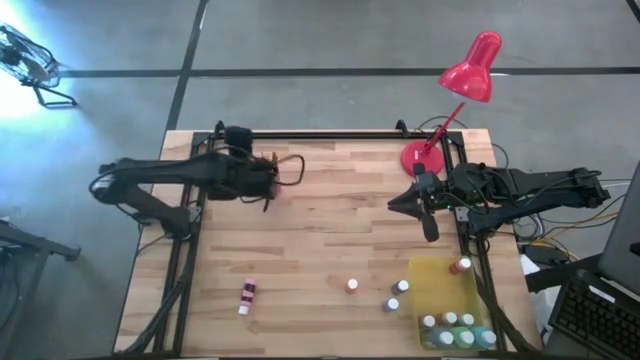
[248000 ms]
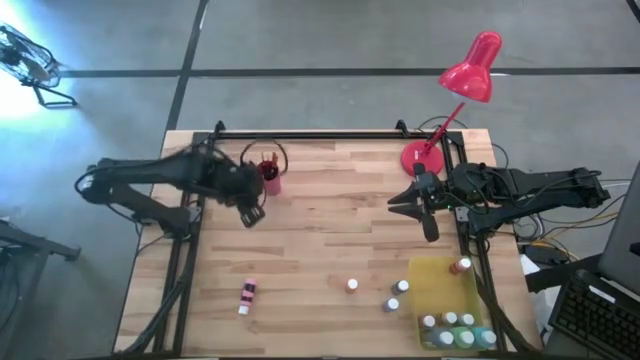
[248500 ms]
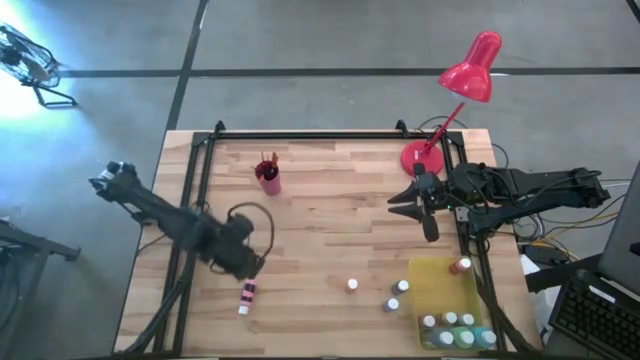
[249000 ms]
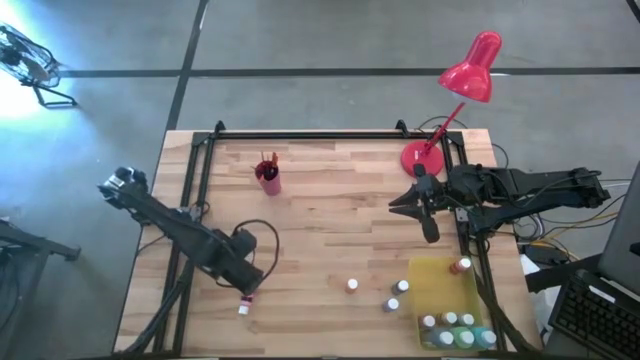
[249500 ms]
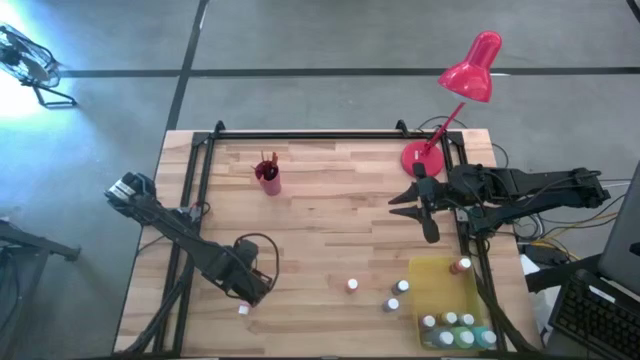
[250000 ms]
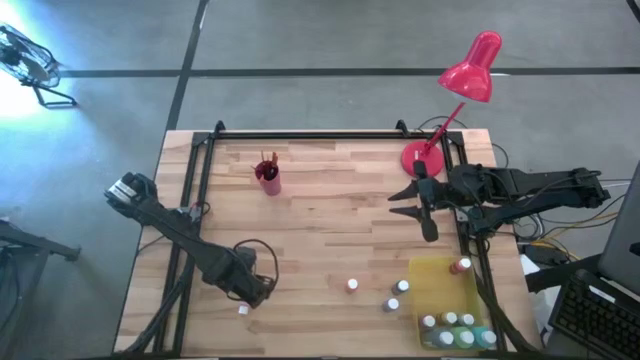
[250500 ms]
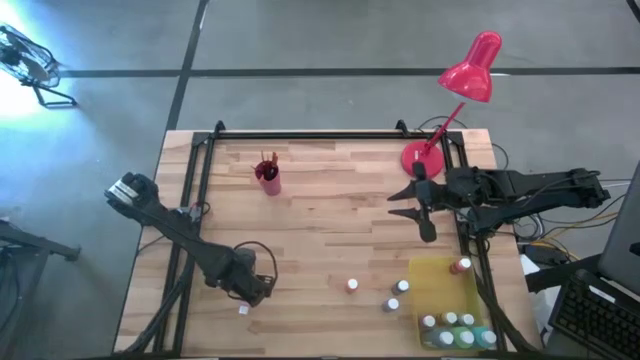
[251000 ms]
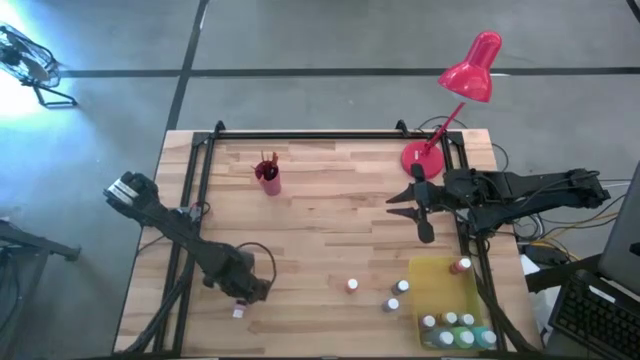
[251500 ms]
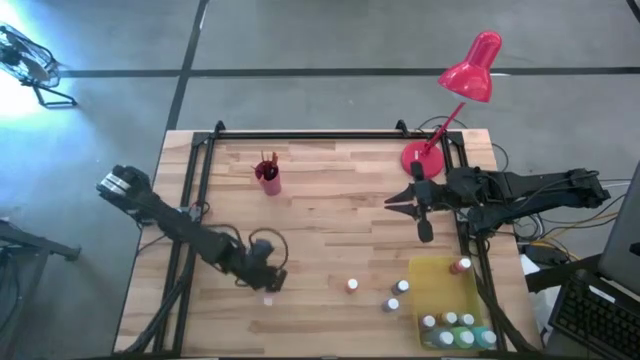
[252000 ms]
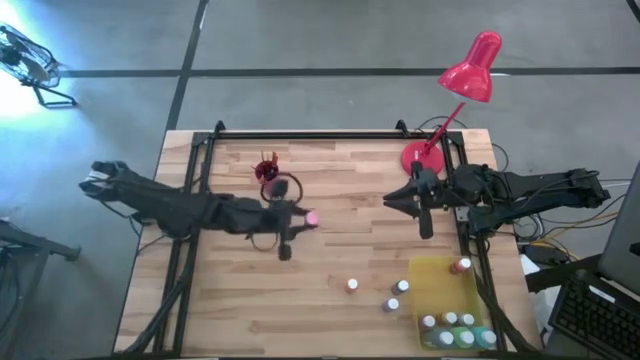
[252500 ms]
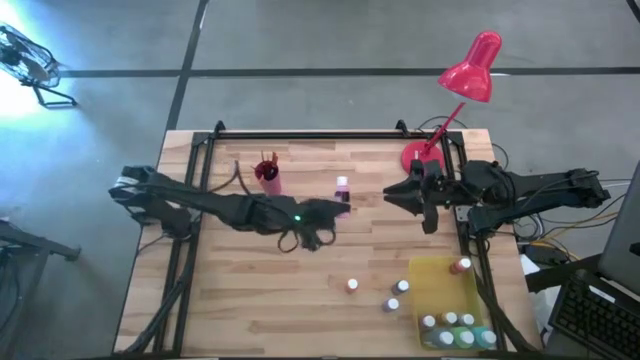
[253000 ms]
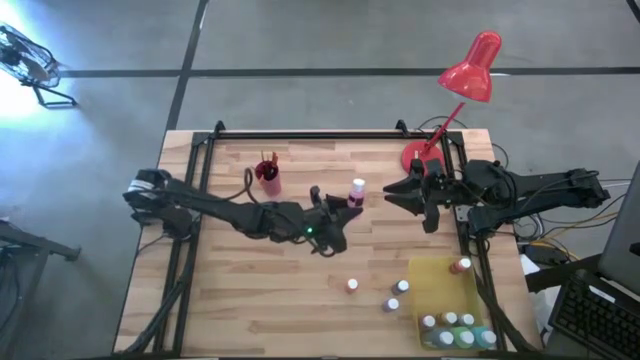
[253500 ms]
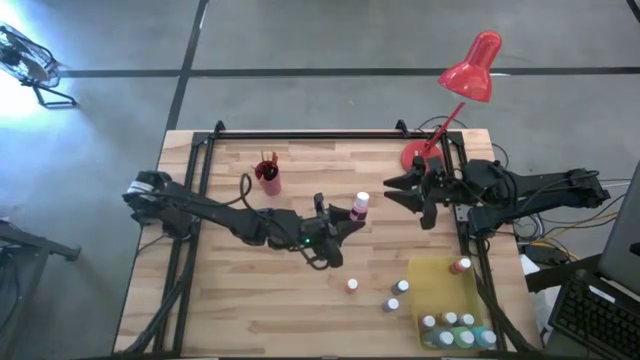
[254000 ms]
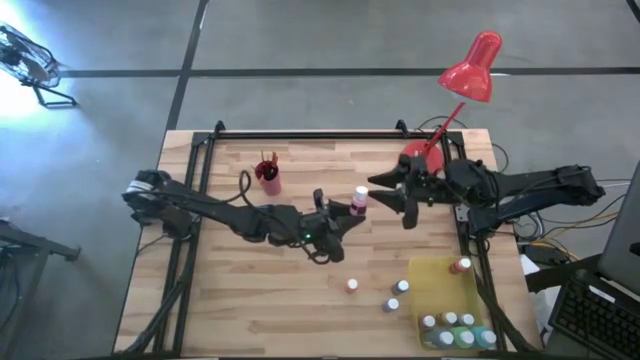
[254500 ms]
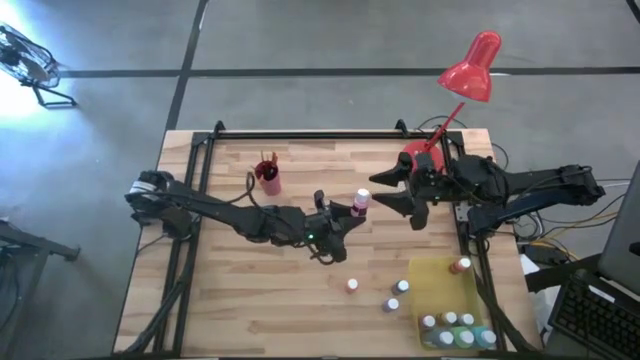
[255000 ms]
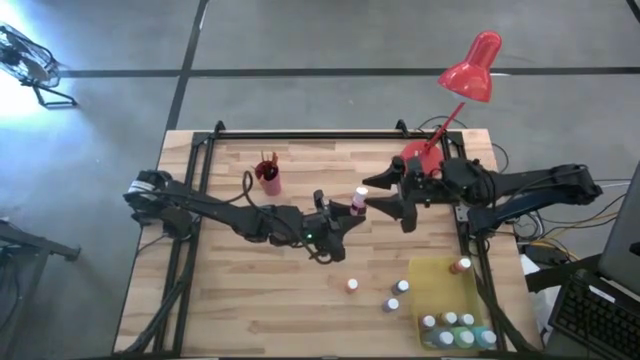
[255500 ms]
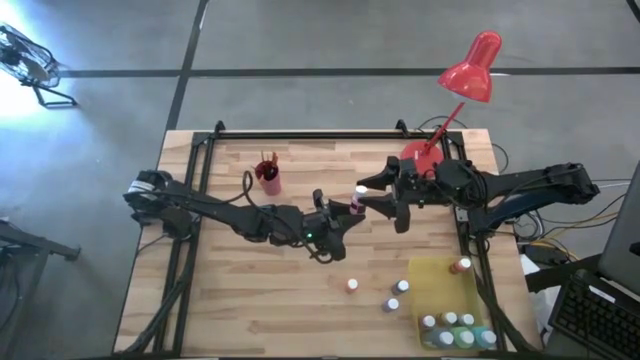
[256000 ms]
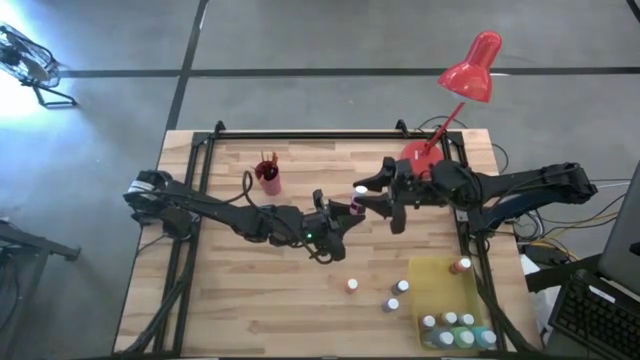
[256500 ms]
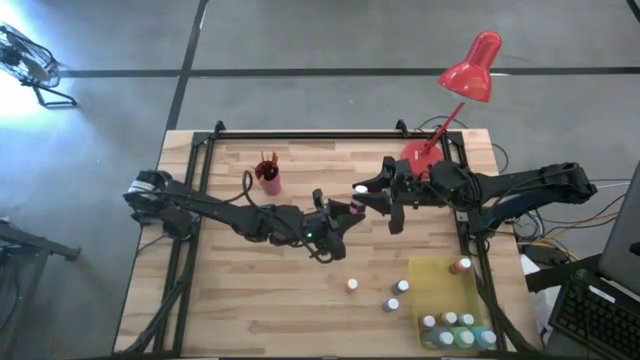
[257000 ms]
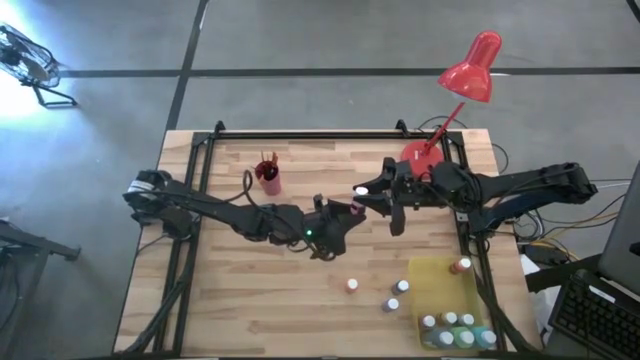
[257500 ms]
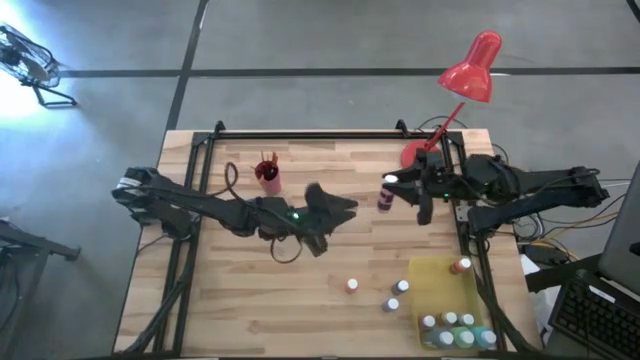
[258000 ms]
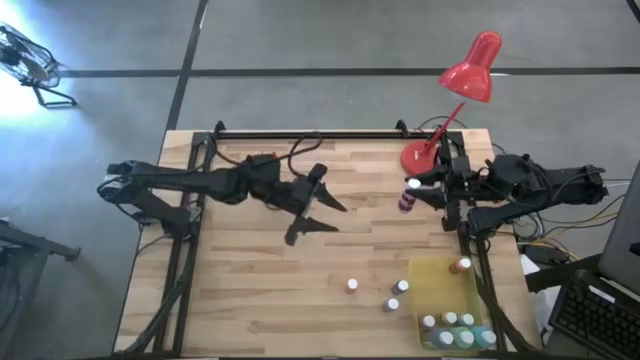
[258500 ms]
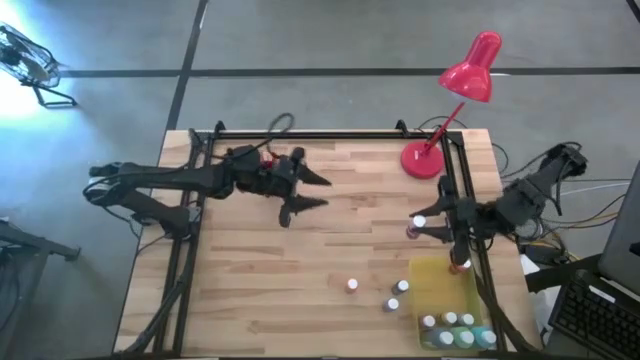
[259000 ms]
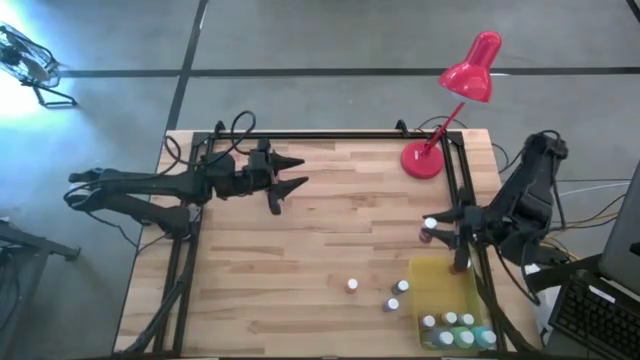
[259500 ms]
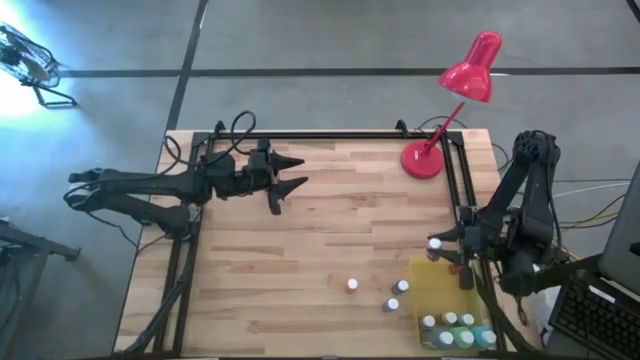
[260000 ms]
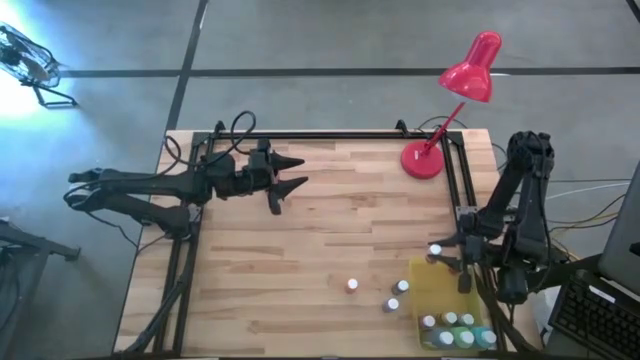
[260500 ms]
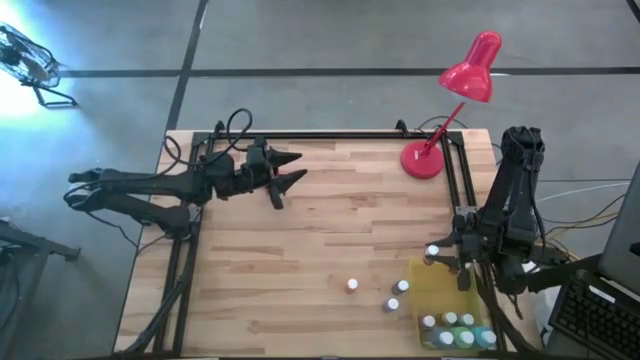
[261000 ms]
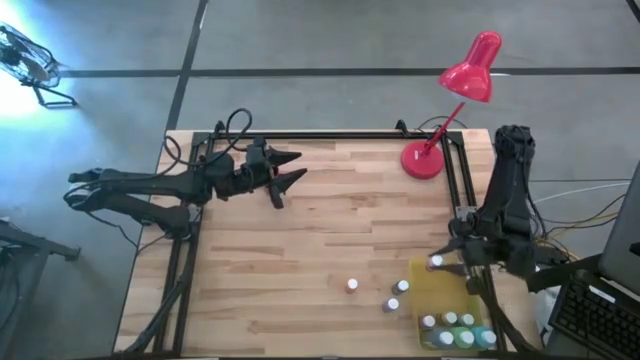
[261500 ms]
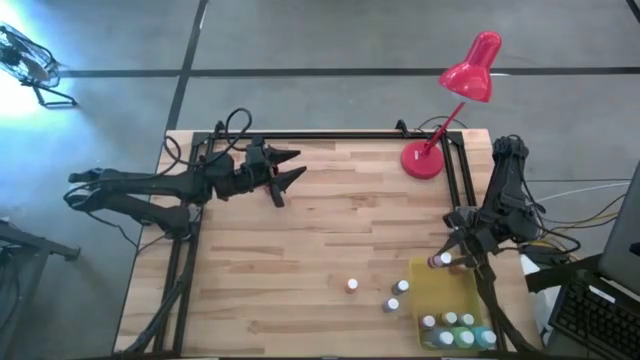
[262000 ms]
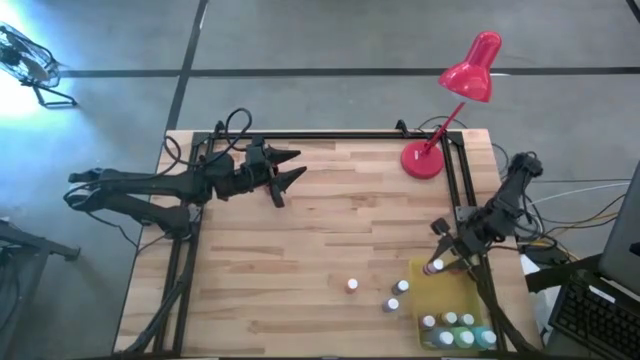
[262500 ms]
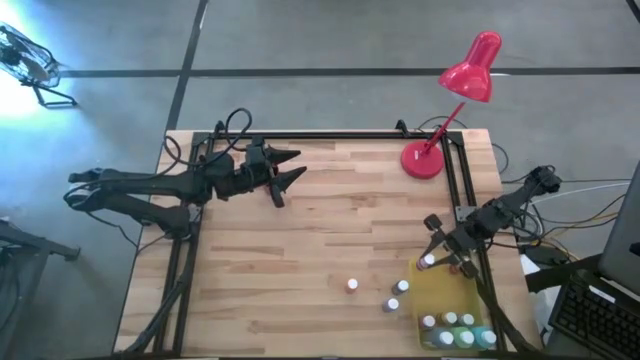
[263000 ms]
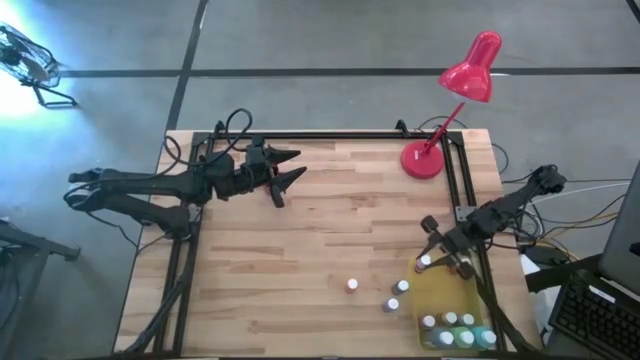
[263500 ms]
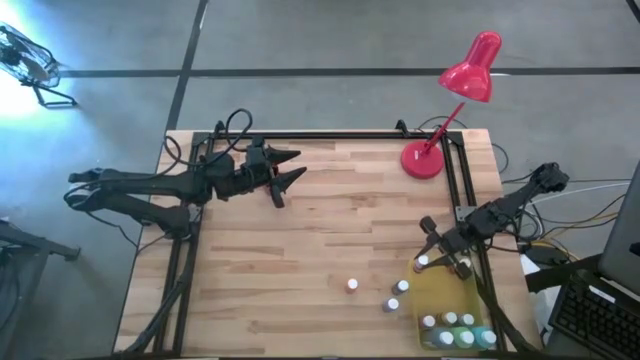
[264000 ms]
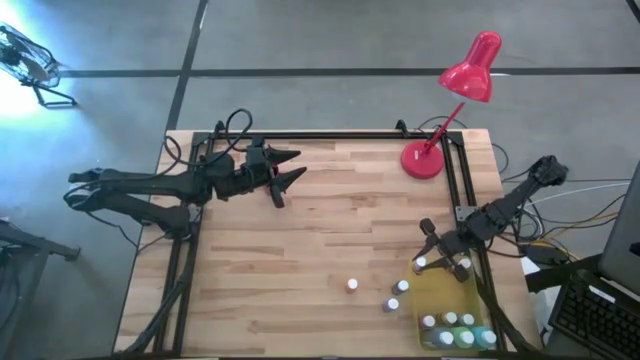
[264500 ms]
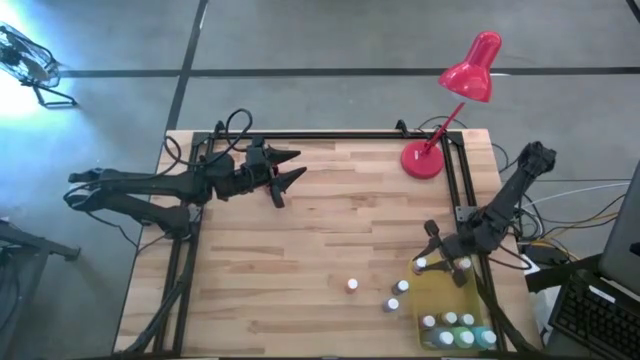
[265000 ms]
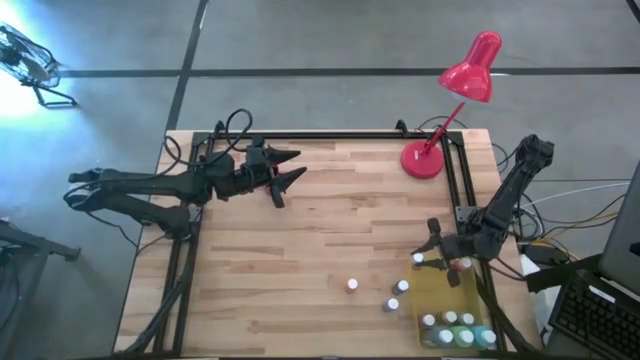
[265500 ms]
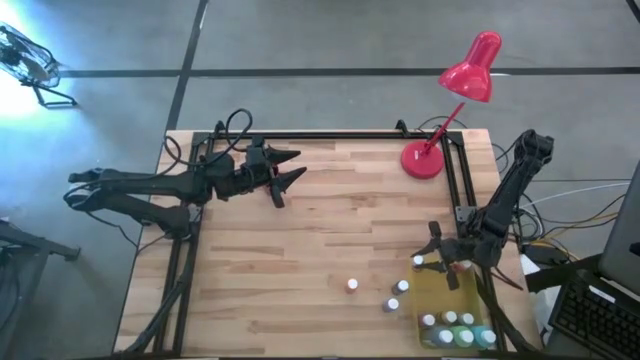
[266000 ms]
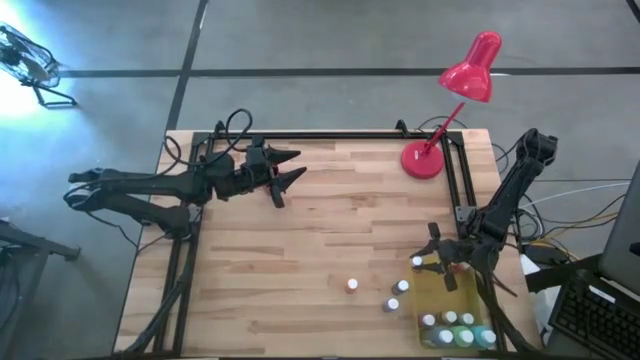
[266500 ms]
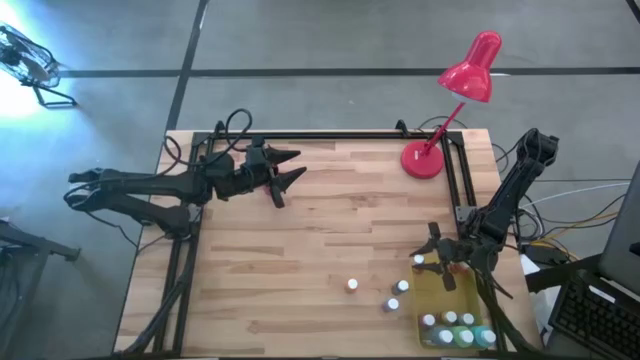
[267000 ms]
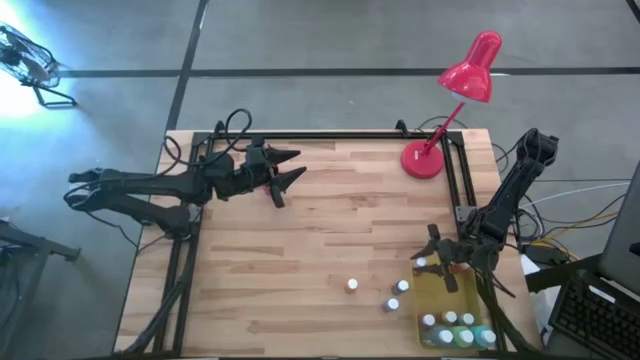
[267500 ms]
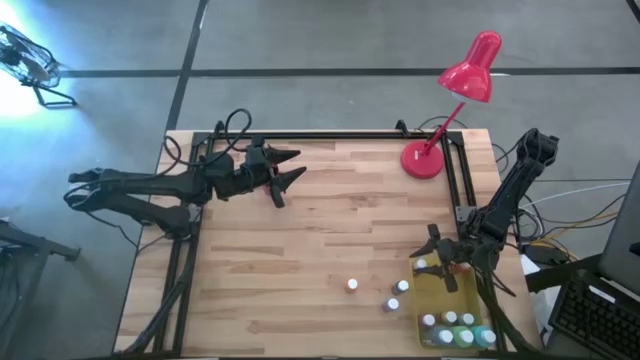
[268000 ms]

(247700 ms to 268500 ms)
Task: Pick & Place Paint Supplies
Put the pink paint bottle into the yellow bin
